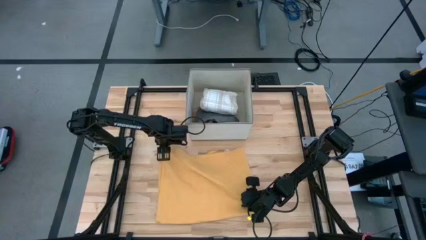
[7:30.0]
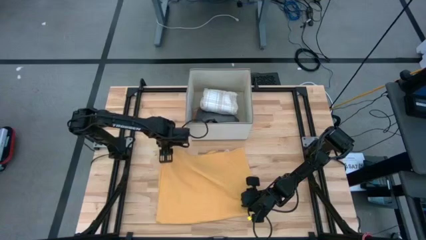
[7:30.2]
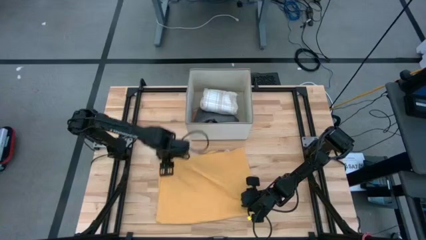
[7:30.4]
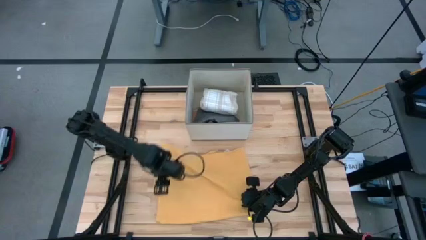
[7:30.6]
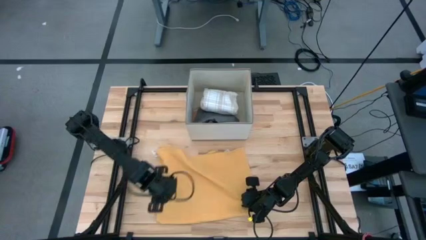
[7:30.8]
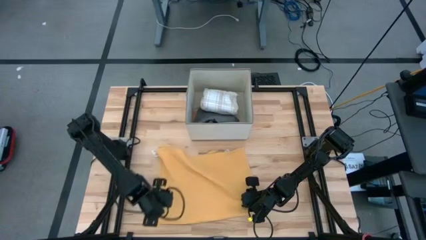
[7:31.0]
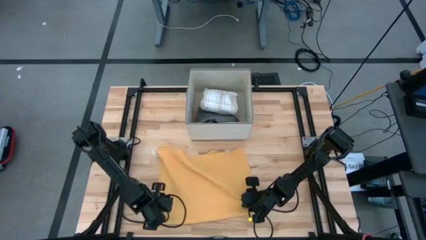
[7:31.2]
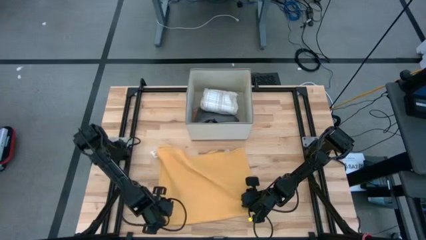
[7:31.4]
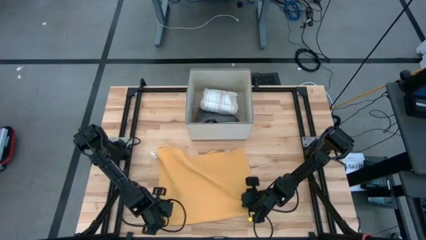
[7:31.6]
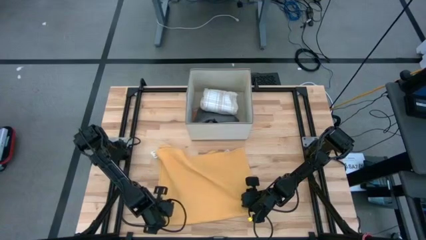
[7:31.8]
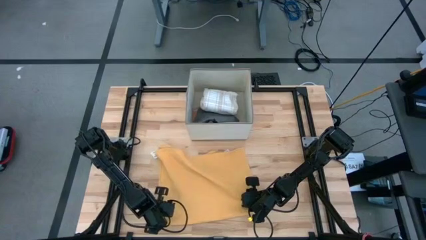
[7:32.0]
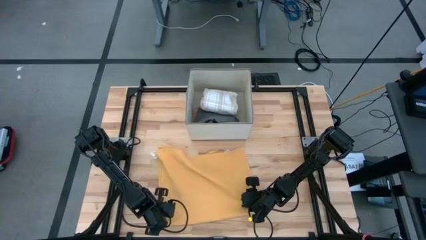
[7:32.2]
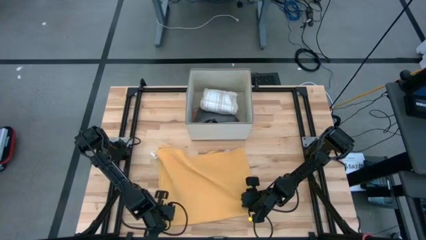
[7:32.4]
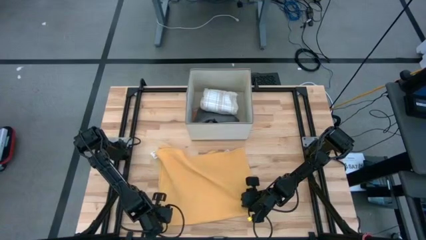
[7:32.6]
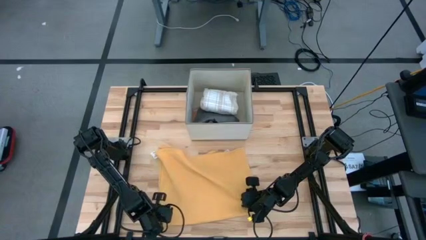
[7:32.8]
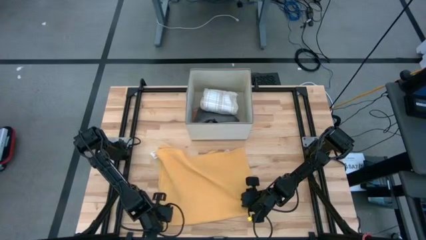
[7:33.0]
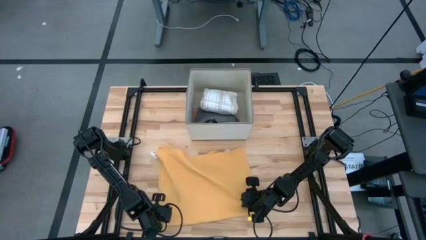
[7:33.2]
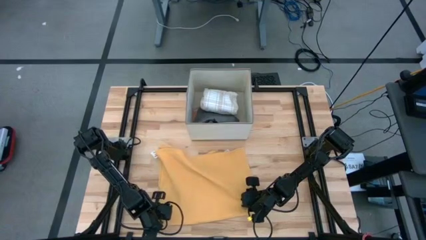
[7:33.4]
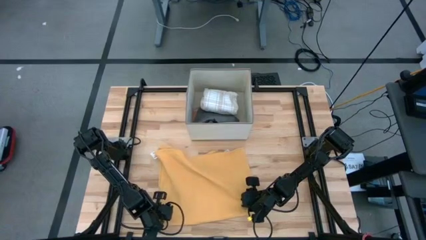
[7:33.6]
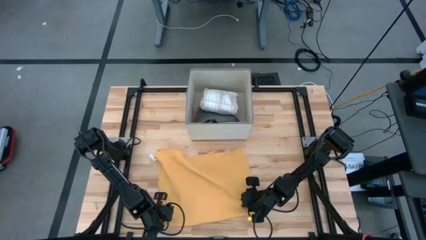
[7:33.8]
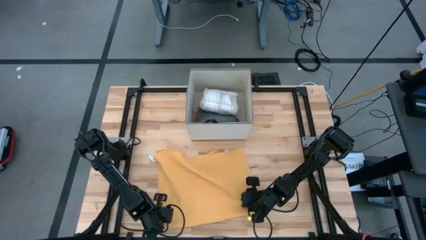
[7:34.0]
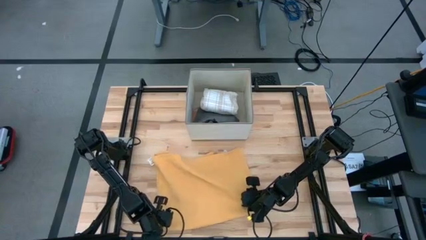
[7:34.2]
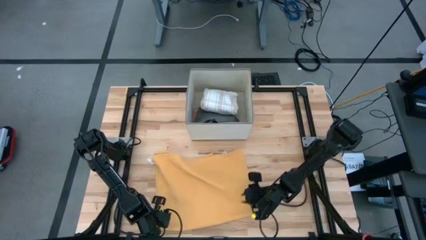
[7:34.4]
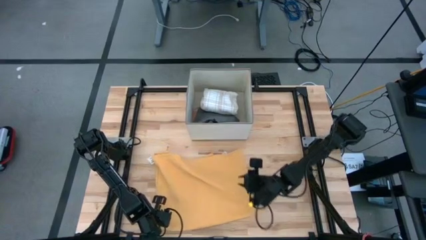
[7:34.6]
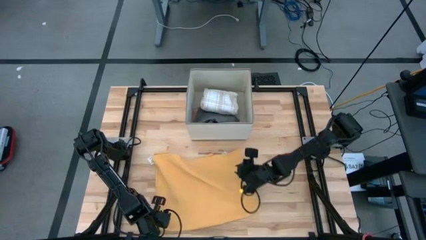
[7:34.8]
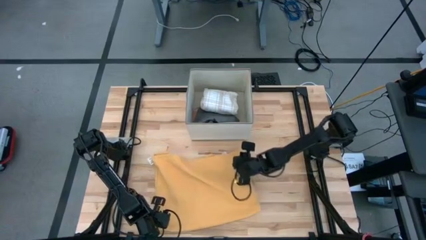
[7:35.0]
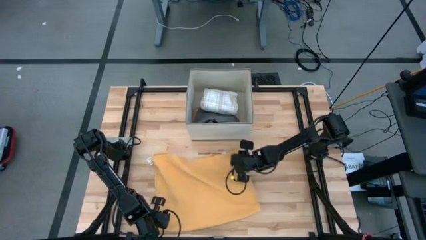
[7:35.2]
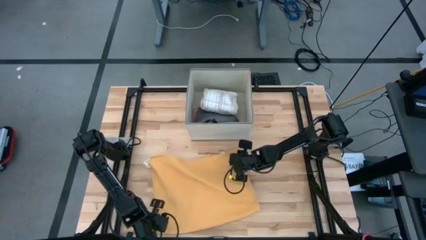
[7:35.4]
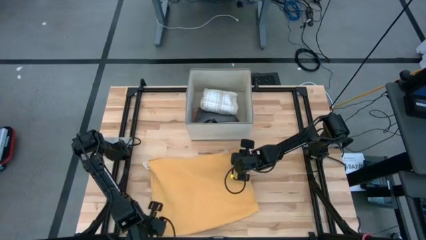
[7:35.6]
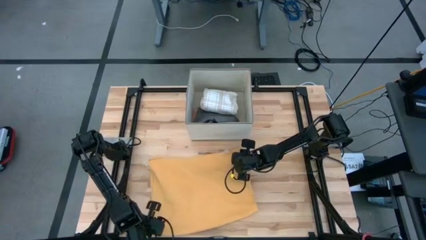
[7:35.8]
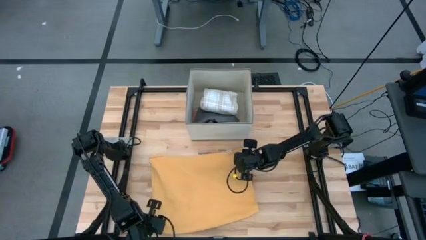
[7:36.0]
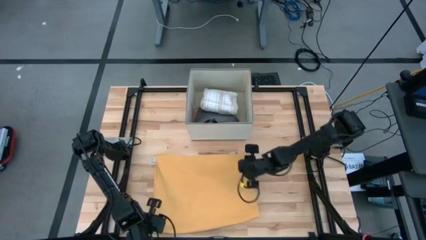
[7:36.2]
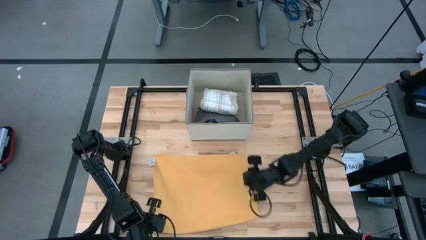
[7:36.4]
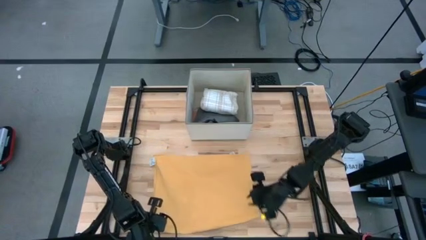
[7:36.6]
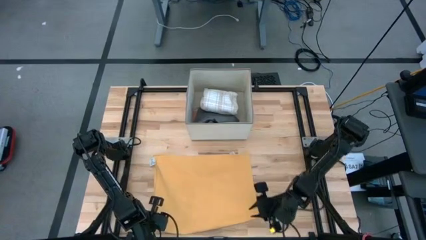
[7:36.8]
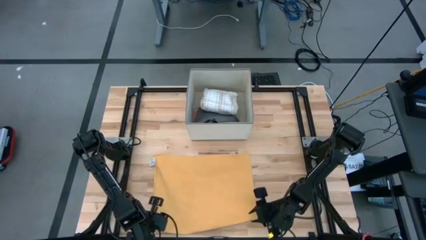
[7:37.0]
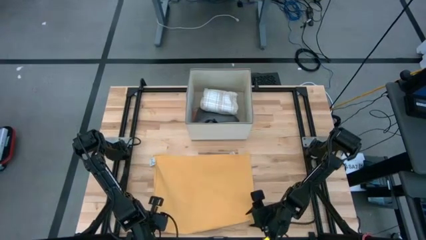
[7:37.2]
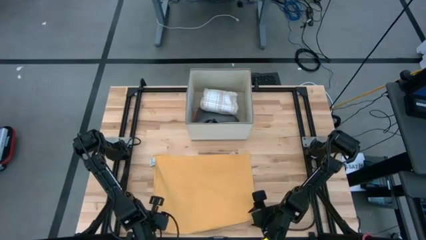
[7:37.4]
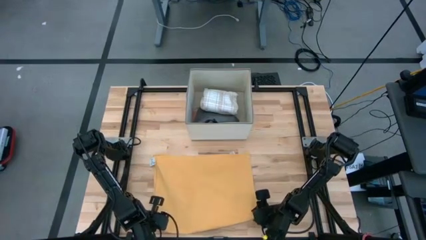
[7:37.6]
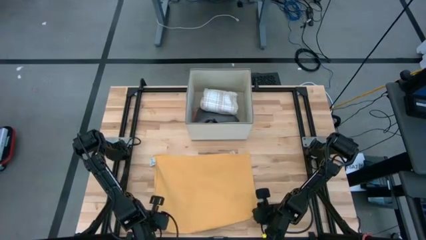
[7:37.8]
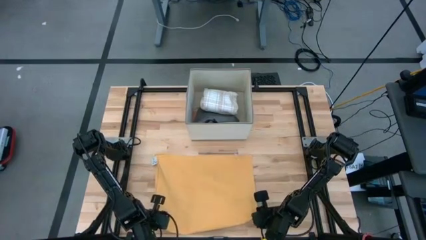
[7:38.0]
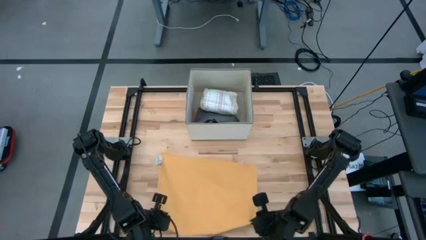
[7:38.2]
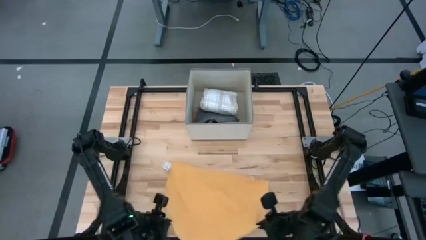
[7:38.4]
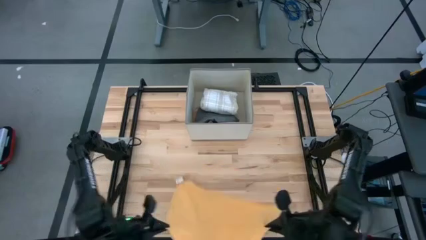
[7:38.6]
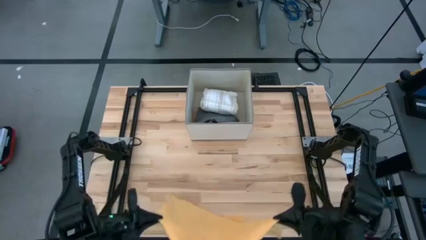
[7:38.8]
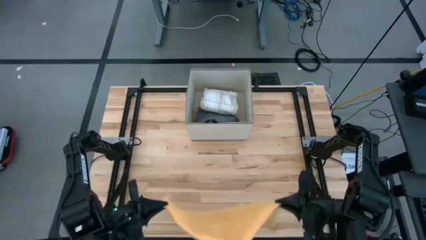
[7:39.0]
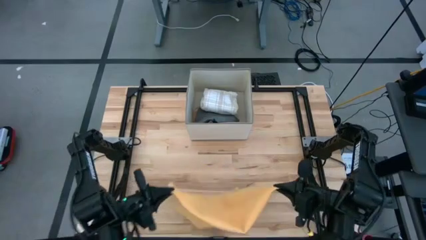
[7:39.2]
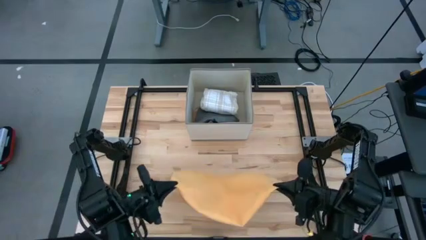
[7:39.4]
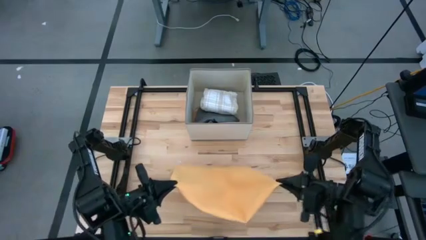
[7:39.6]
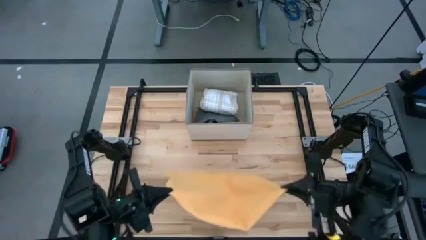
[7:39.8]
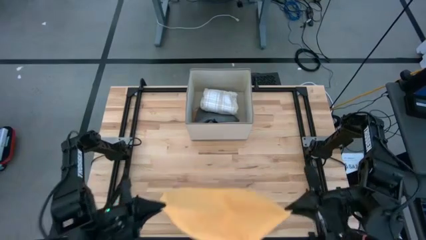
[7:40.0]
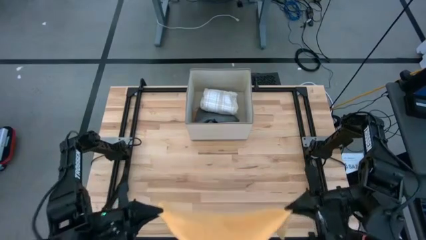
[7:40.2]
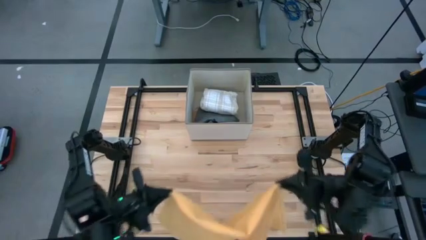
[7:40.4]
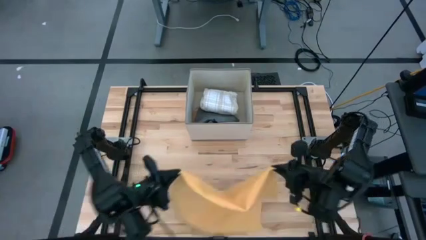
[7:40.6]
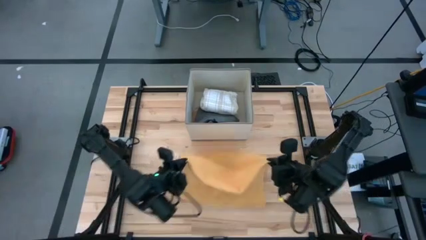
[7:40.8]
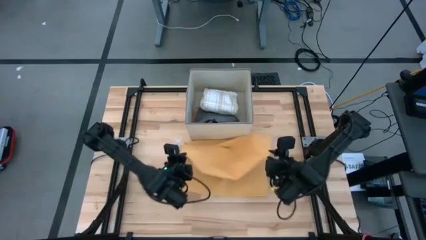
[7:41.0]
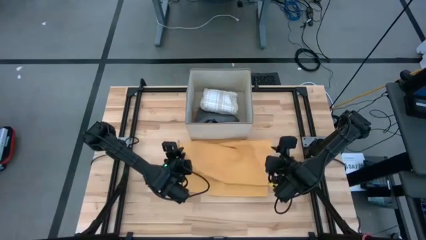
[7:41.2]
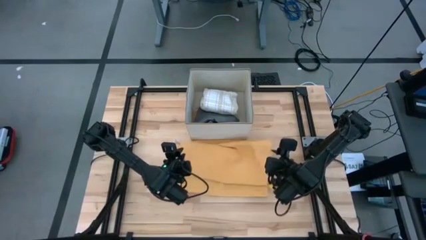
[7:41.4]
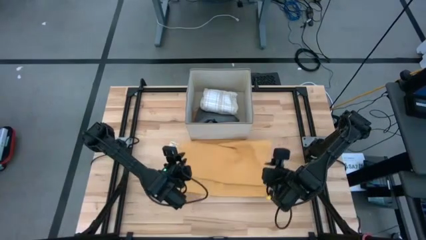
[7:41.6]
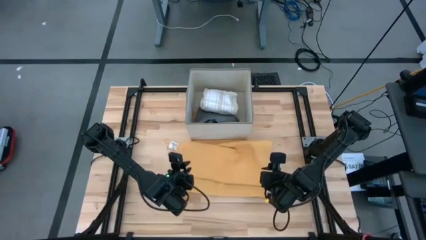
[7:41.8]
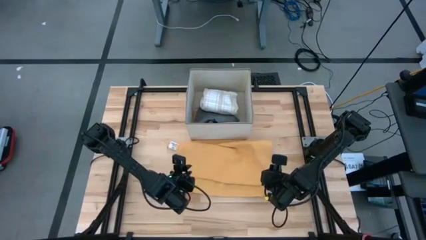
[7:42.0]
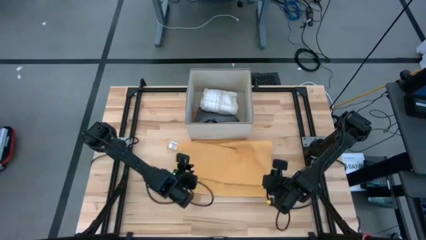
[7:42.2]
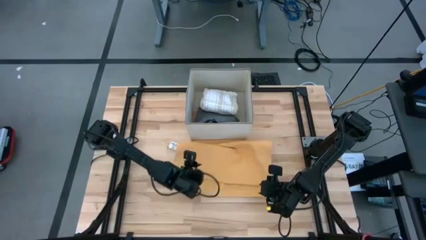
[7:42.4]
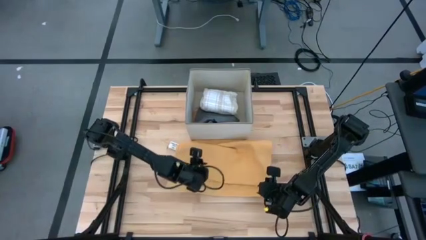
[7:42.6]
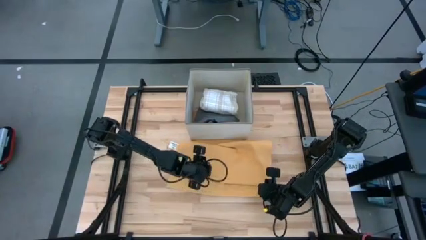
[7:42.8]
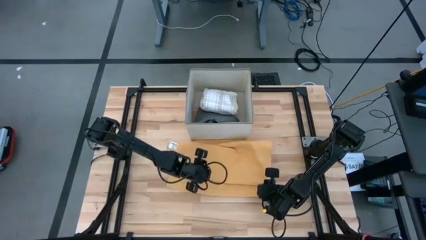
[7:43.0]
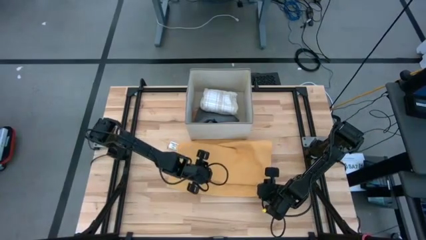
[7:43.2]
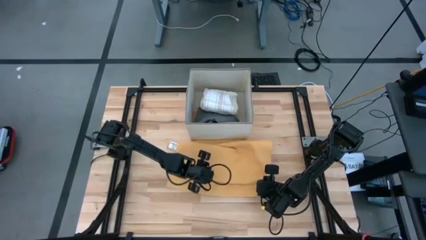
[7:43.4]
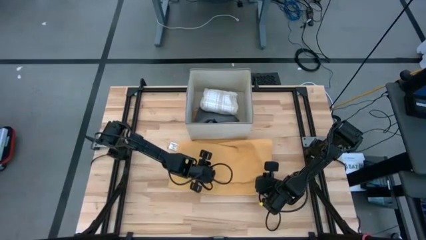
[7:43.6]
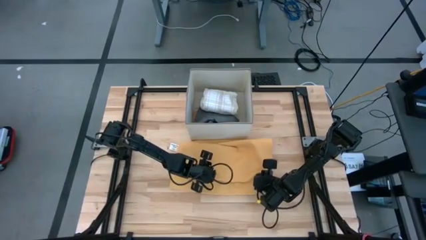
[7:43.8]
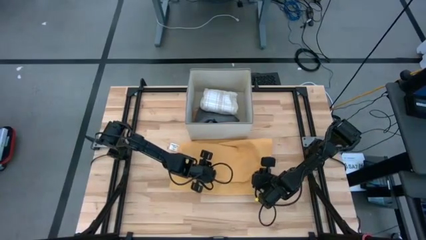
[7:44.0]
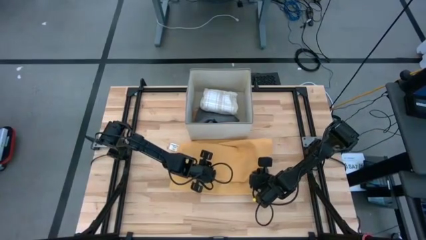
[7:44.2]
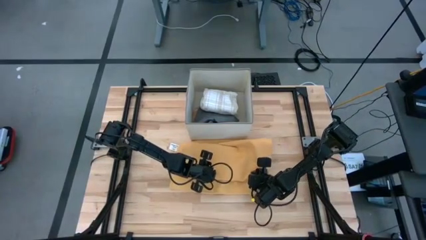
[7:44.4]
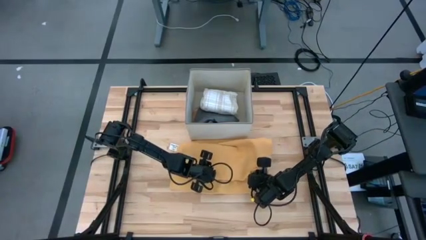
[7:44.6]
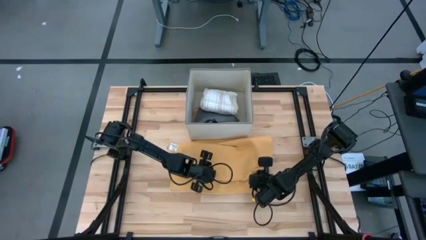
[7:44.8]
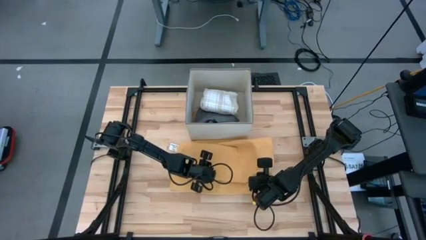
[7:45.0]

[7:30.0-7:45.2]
Task: Fold towel
Fold the orange towel
